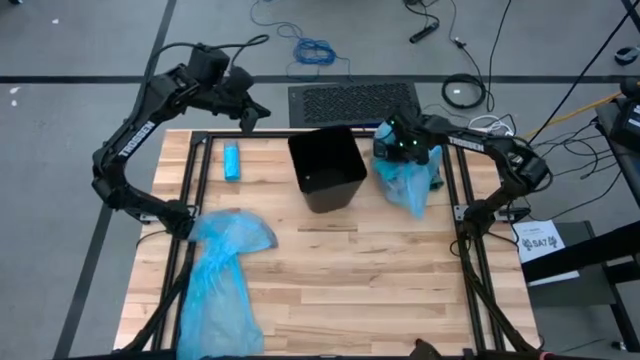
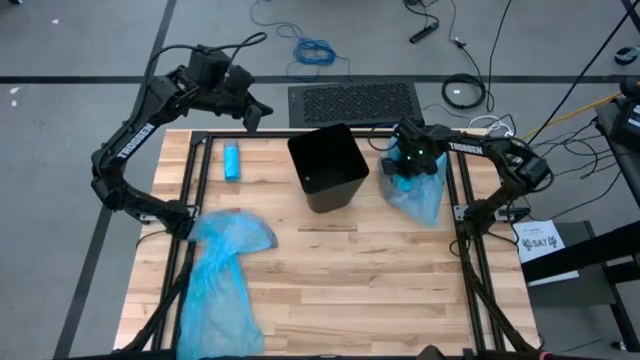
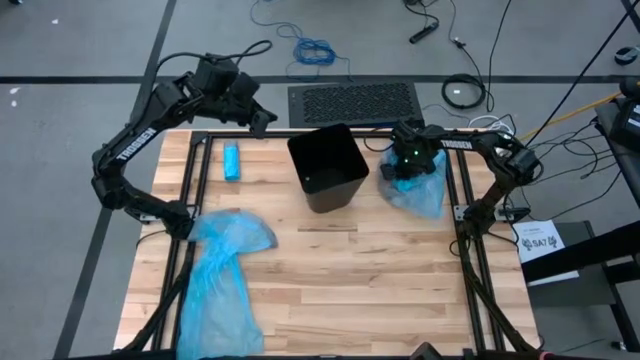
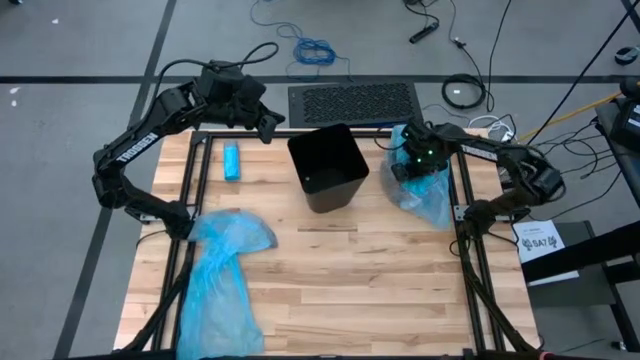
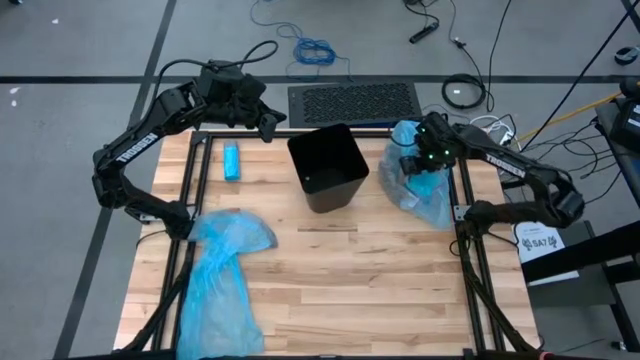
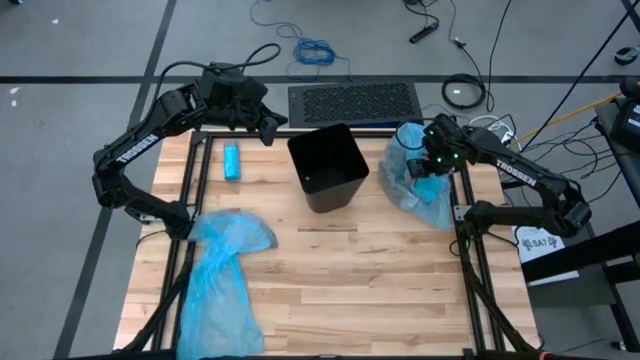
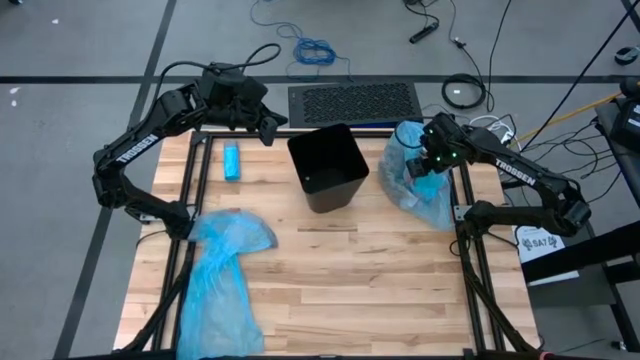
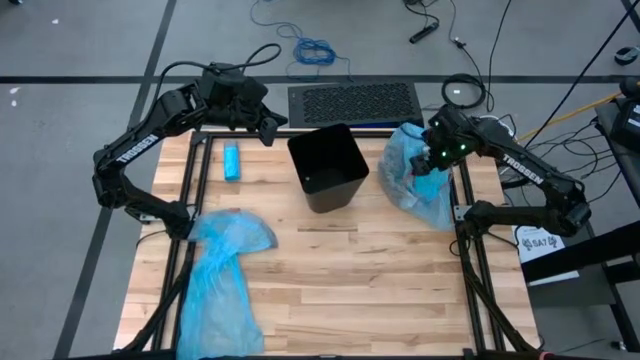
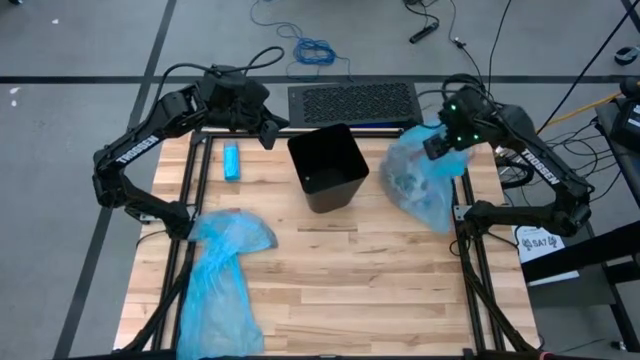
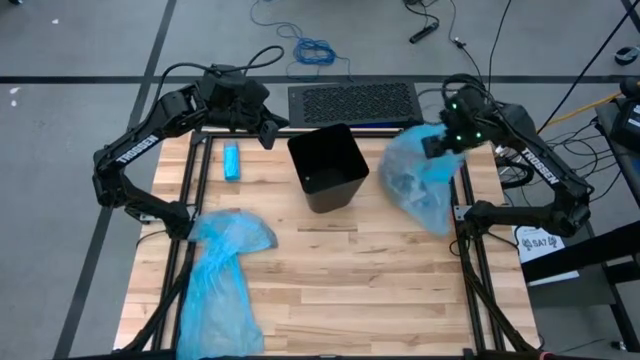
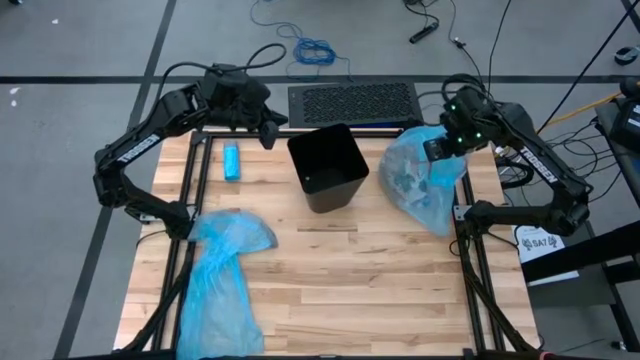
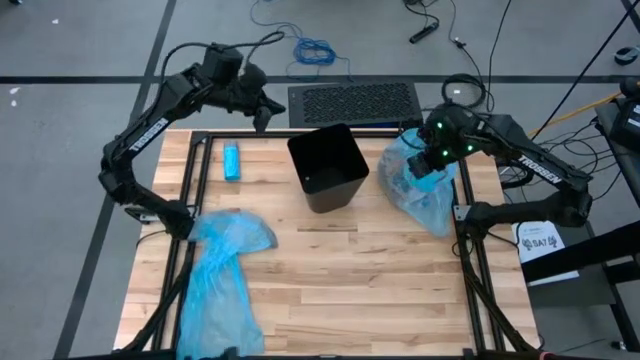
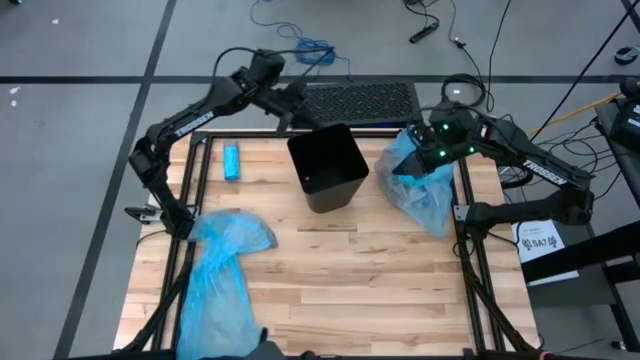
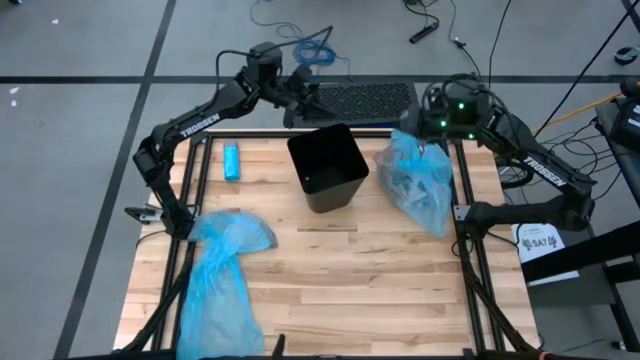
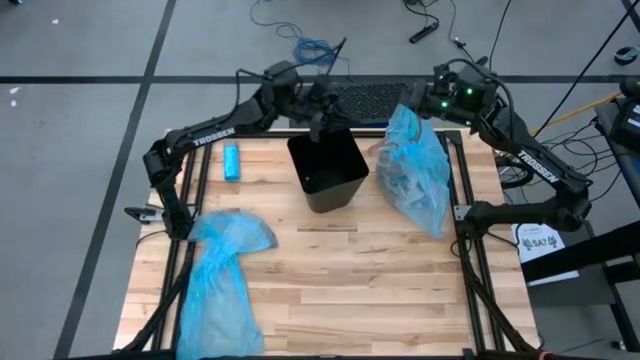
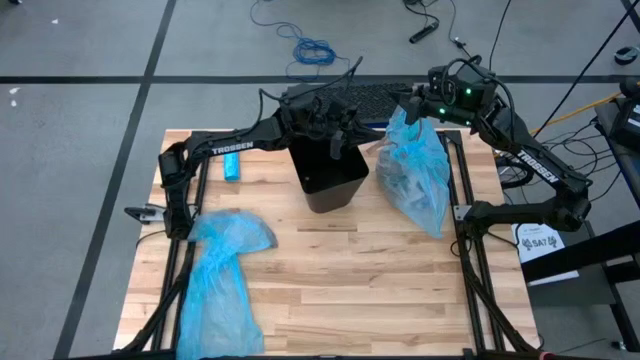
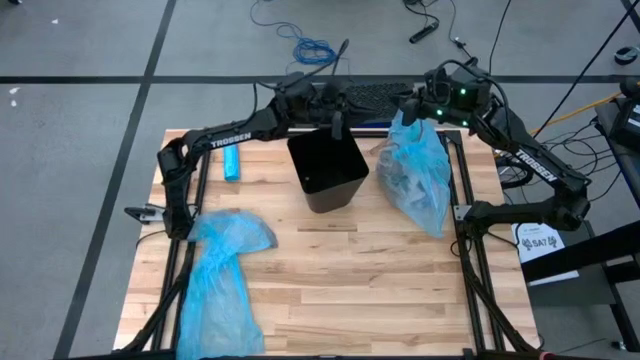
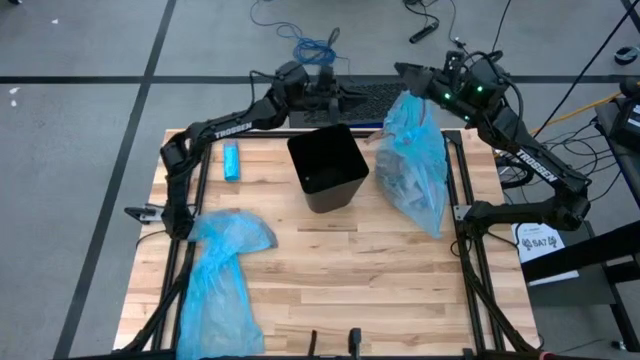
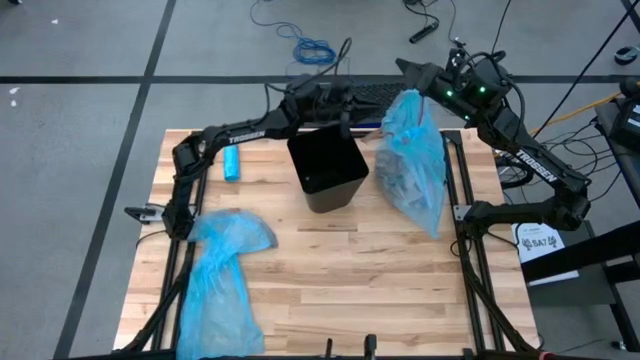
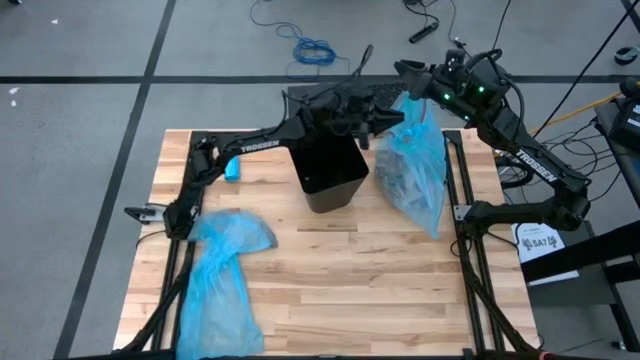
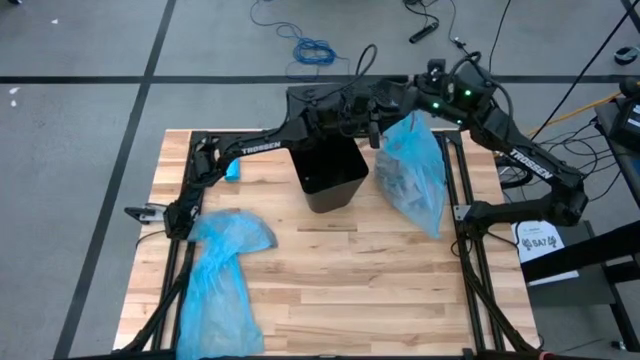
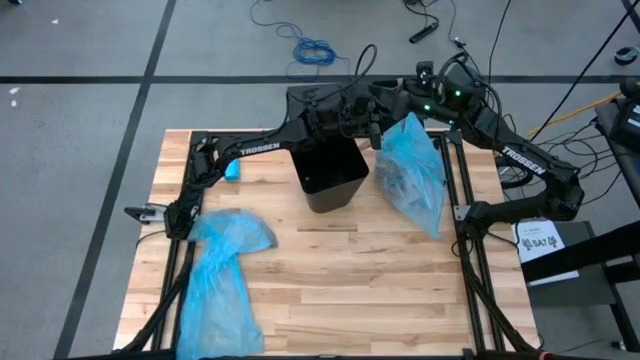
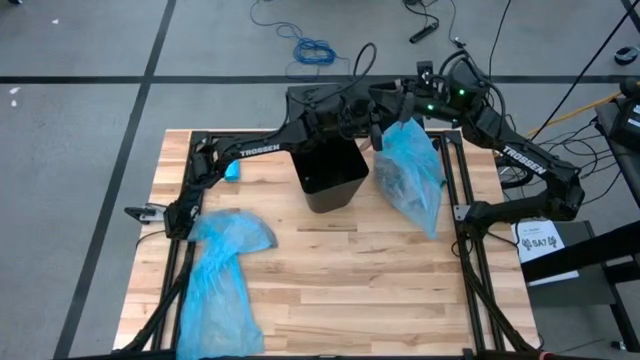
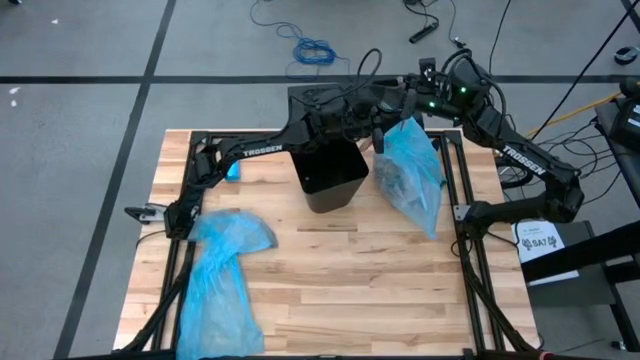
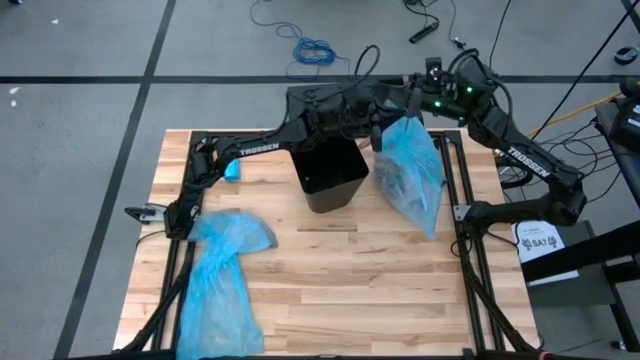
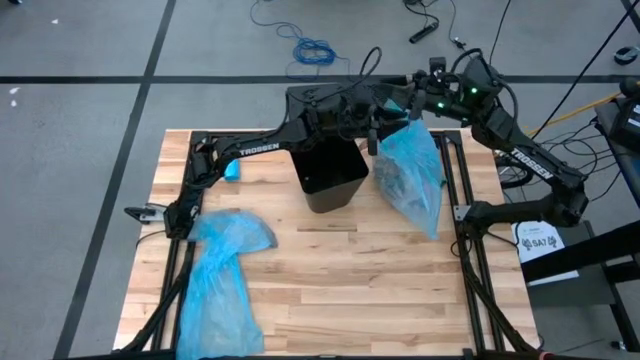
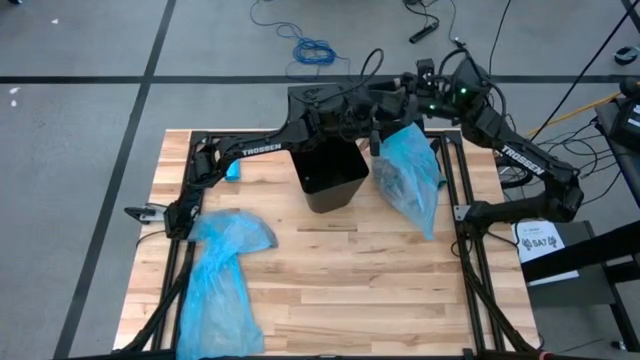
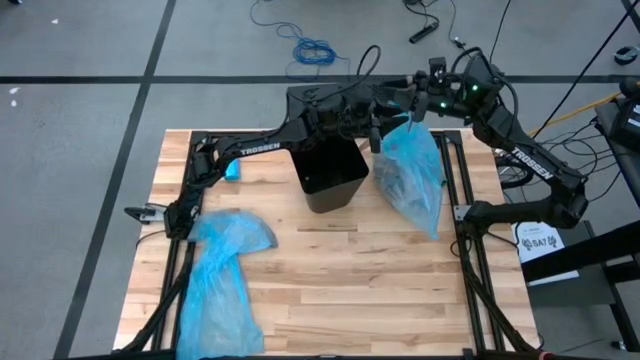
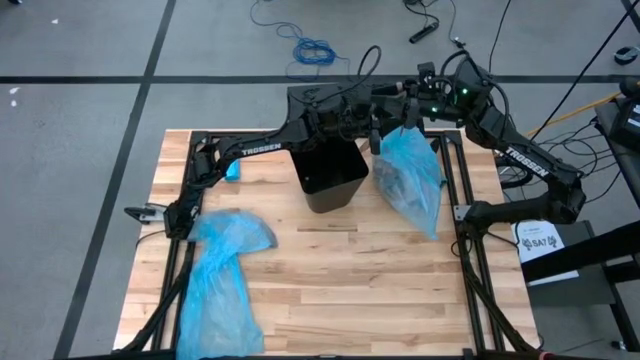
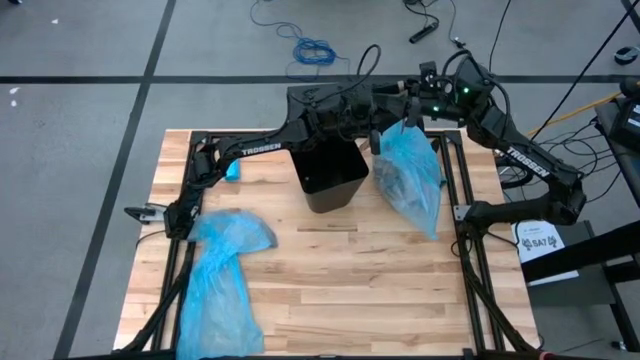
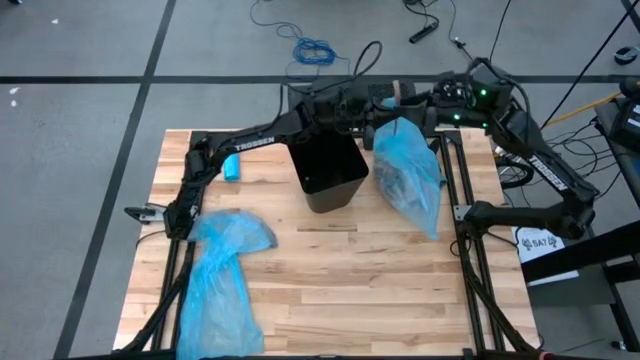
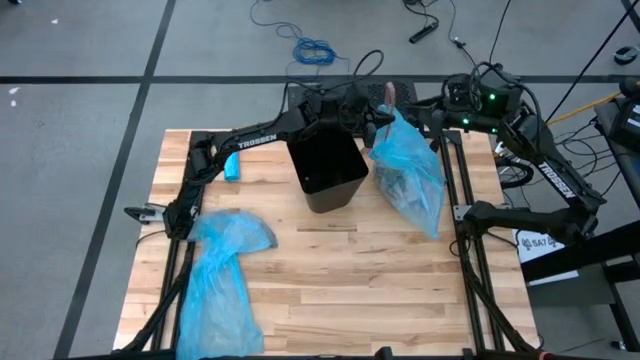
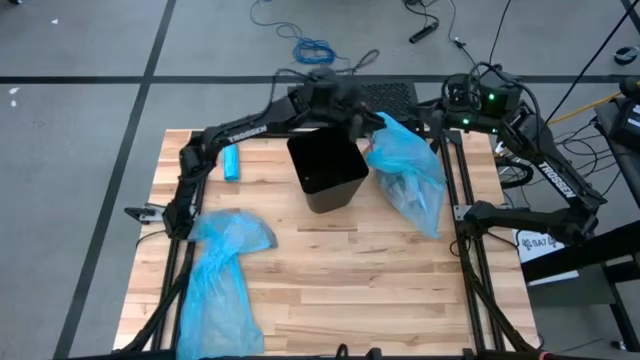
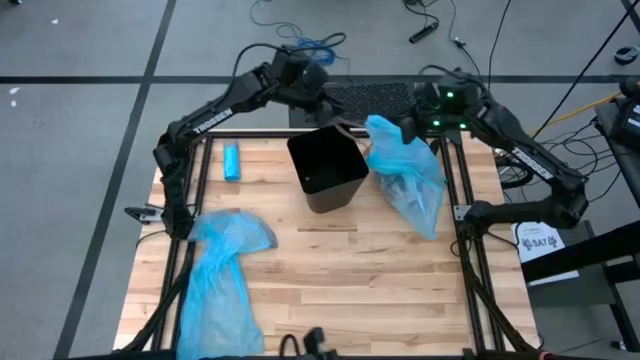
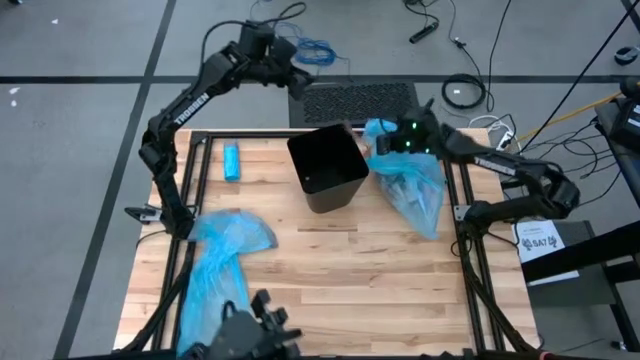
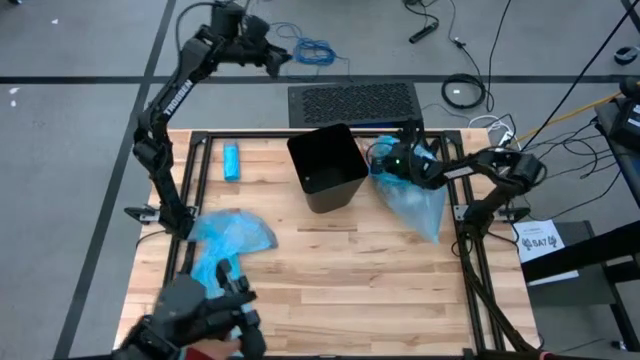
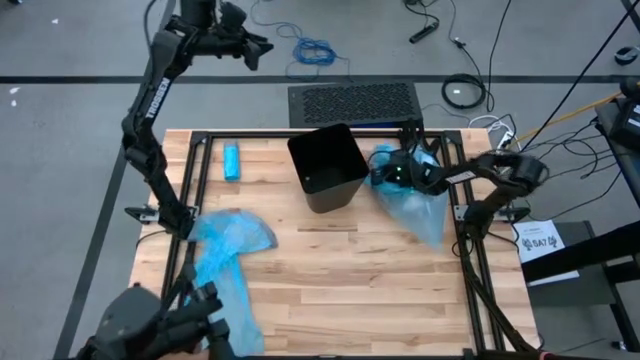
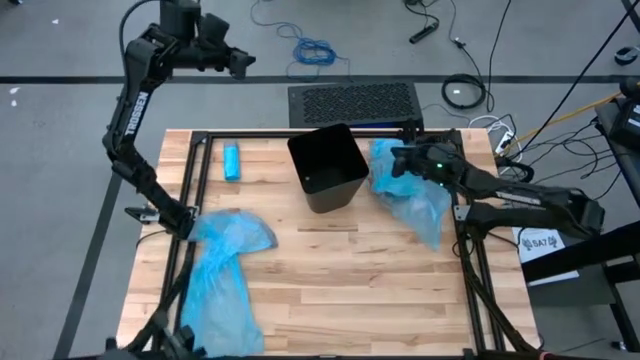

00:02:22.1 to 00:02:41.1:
Task: place trash/remove bag and relplace
Remove the blue trash bag from the black trash bin

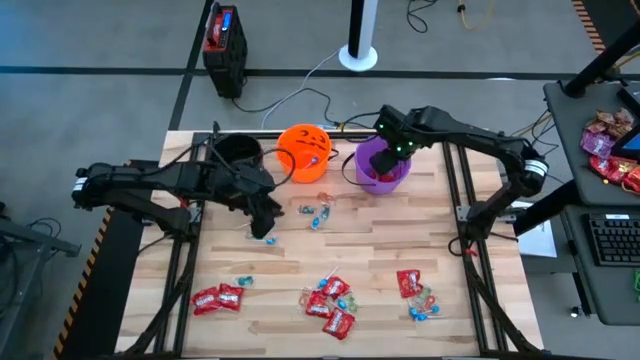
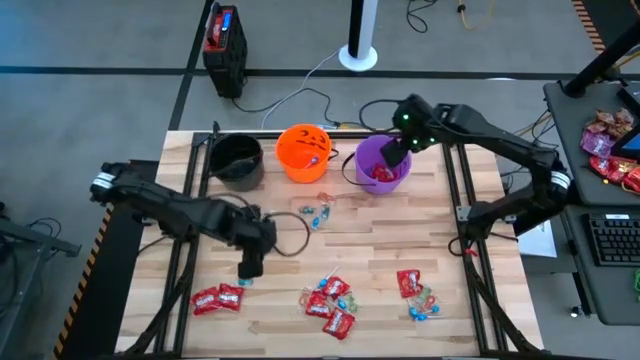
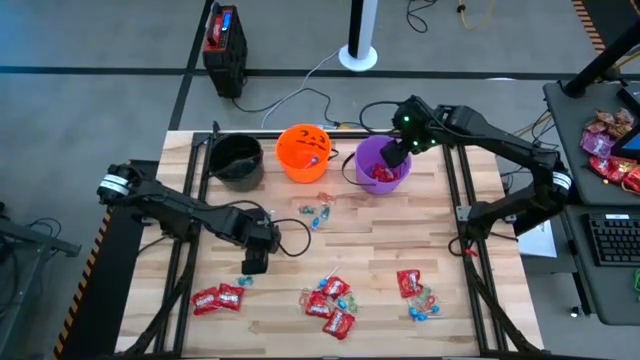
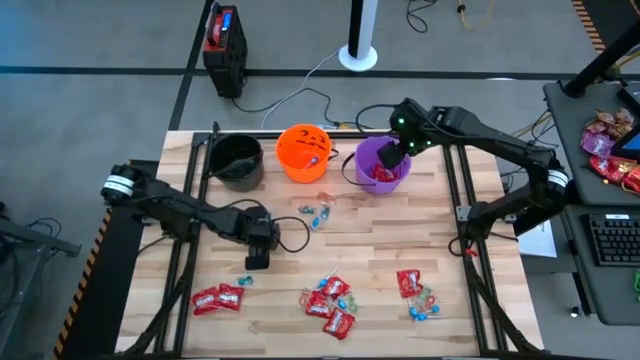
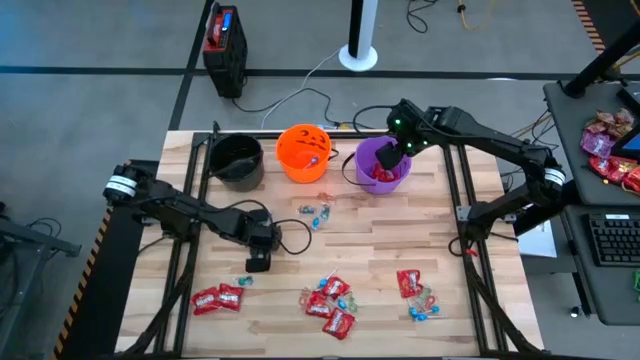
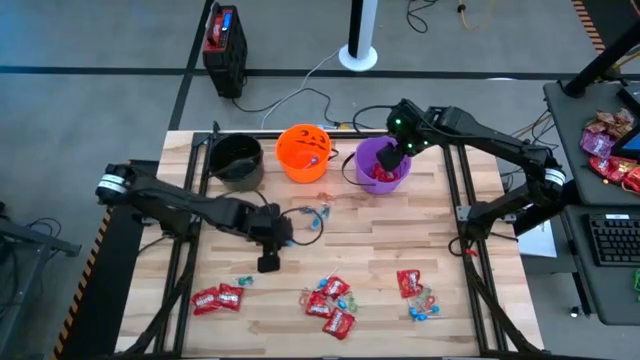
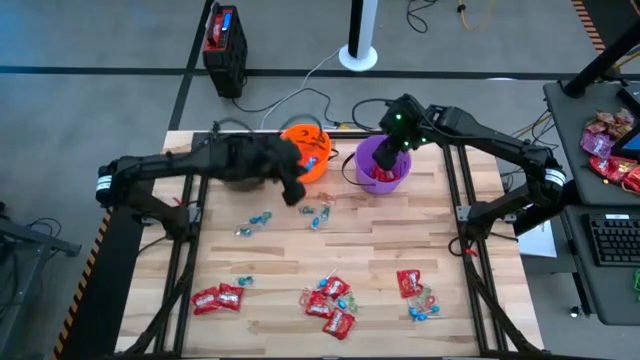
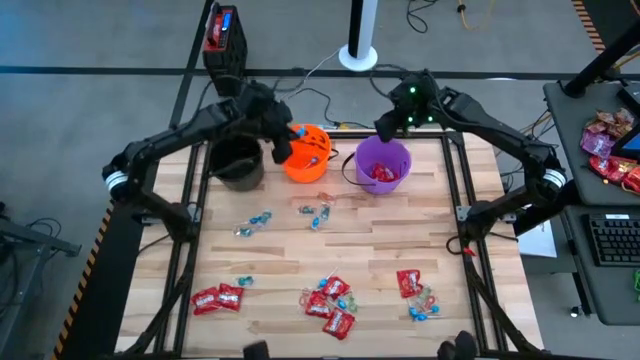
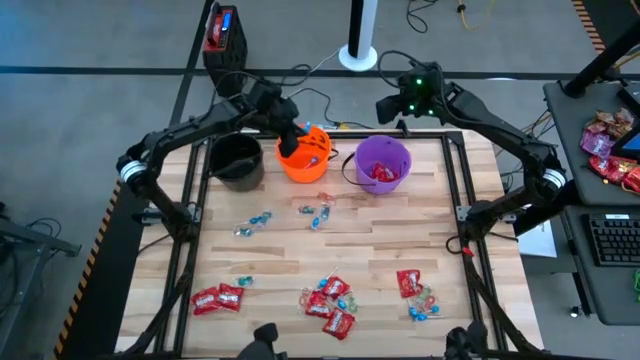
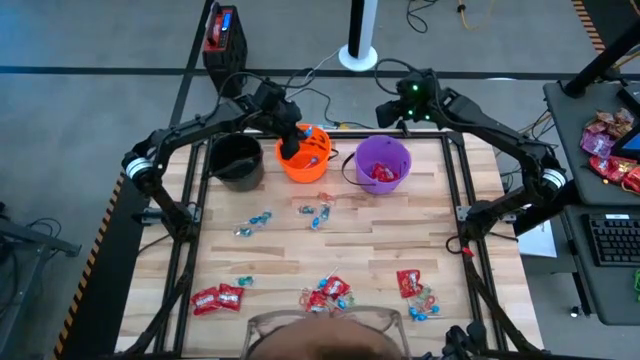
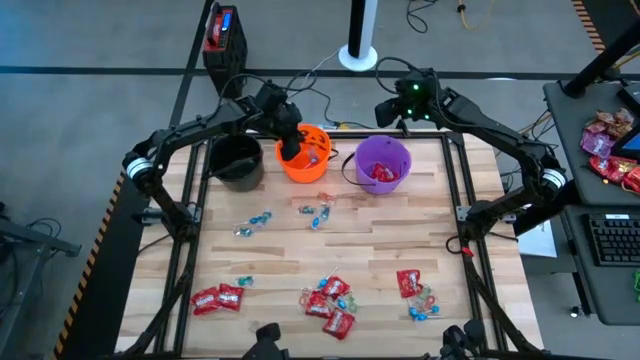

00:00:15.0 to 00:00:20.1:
Task: Sort candy by brand, put in halloween buckets
Put the blue candy into the orange bucket
